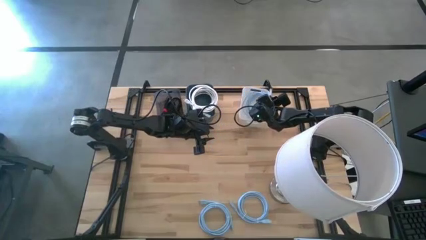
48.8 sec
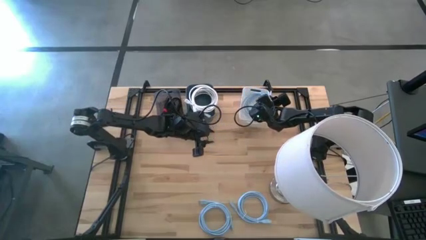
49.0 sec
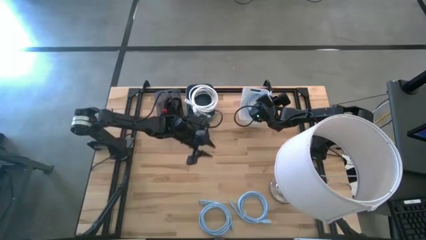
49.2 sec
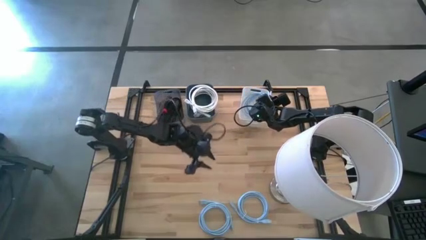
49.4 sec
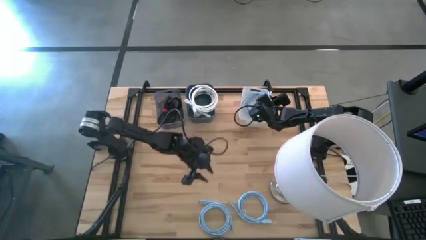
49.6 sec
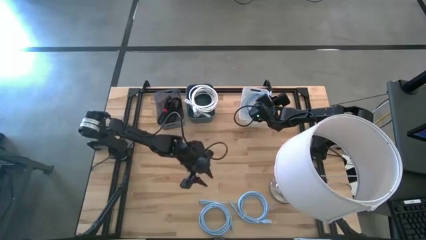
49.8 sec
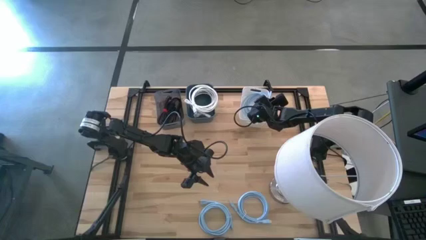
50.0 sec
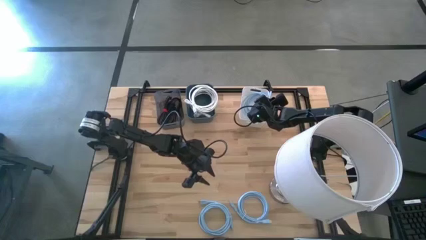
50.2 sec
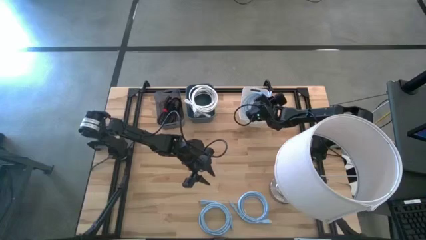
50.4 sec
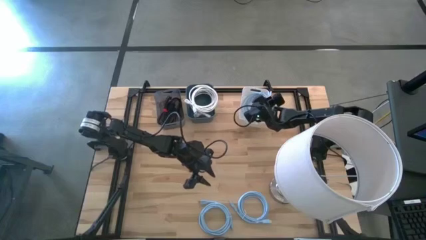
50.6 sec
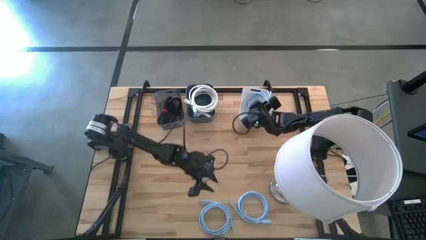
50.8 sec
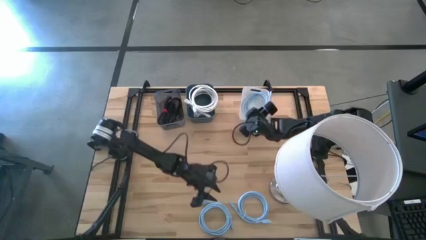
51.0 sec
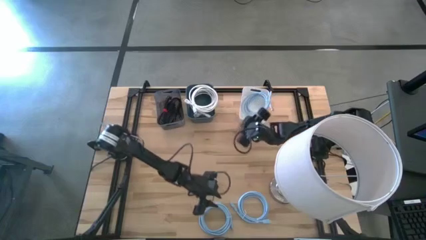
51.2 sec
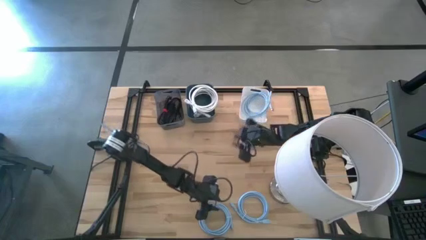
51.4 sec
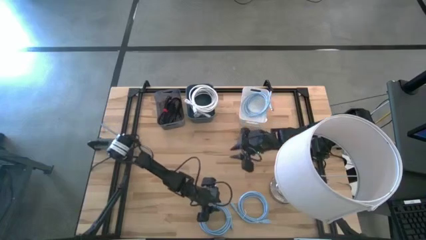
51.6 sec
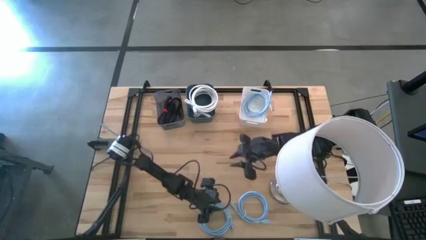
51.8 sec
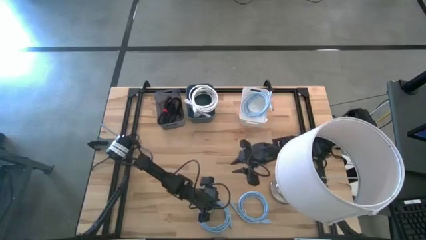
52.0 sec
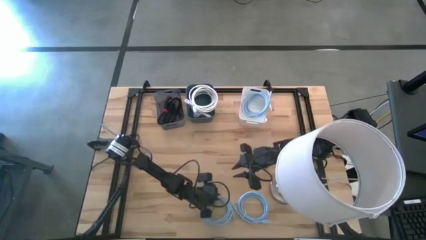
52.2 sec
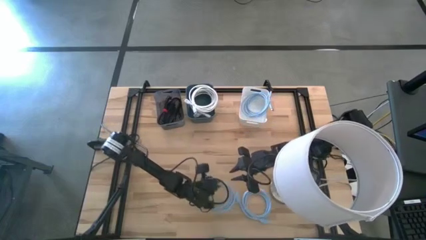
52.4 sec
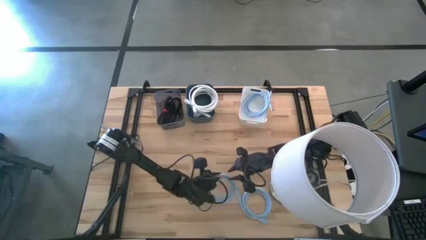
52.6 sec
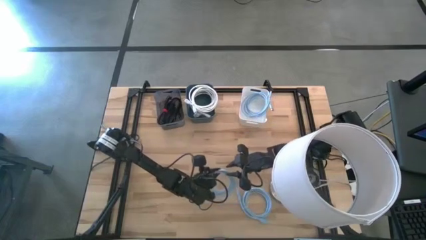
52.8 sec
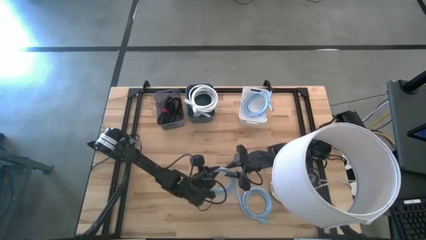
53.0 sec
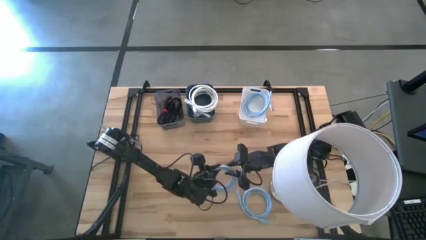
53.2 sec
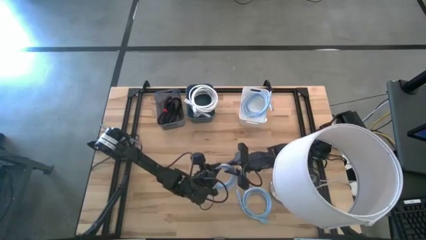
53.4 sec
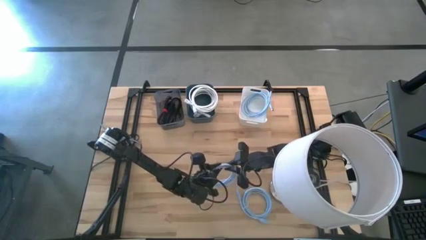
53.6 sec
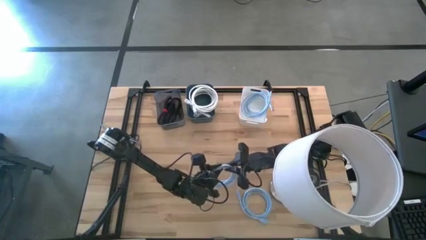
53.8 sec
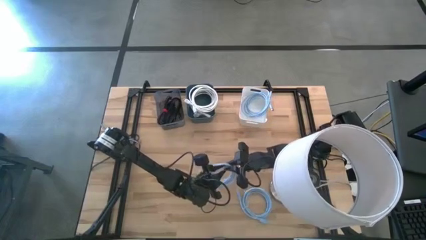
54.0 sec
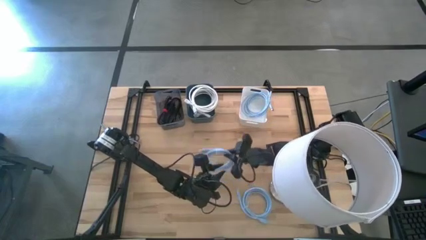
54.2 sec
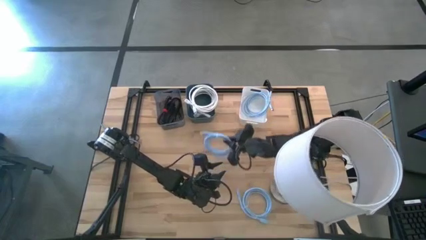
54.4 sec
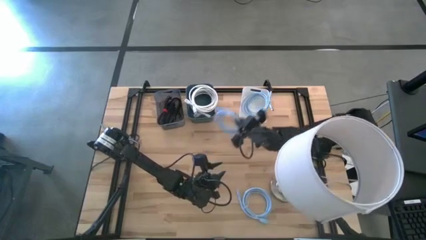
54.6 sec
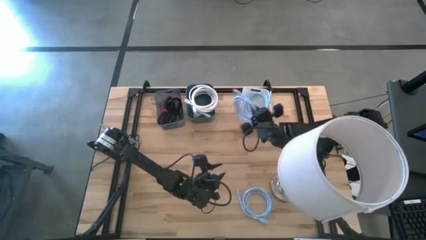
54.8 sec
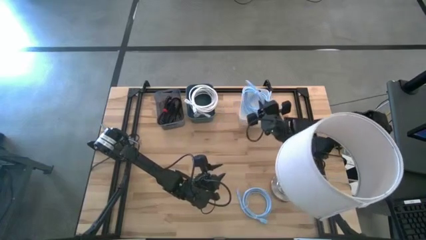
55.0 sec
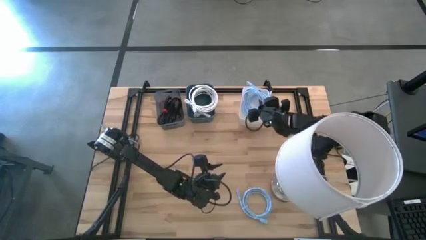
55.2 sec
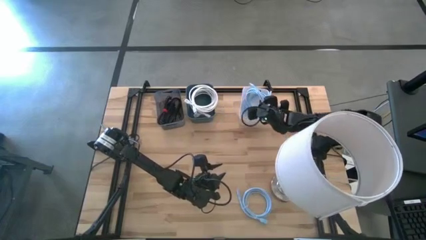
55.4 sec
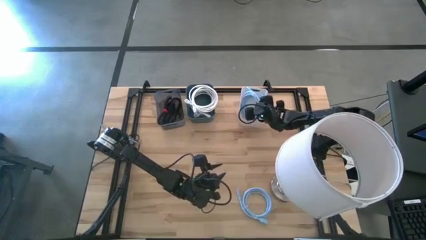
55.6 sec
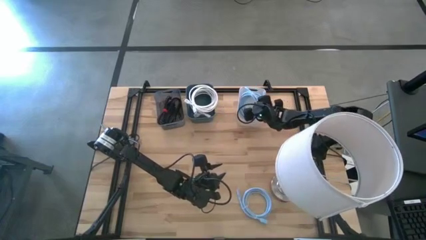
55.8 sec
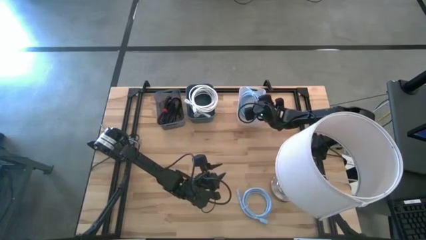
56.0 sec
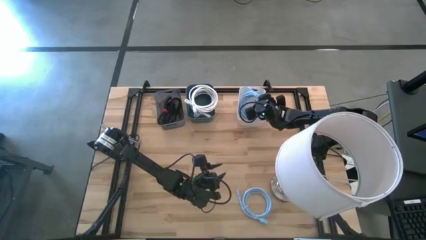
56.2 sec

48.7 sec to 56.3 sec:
Task: Sort HDMI cables
Put the left light blue HDMI cable into the white bin

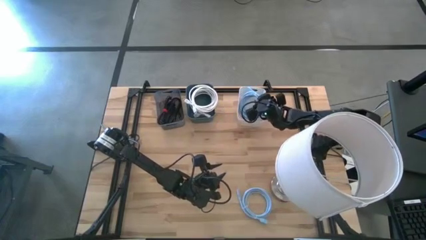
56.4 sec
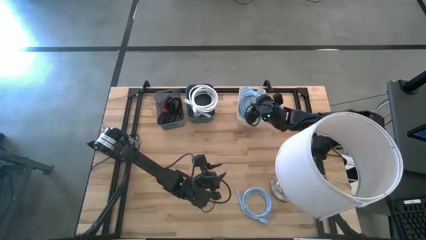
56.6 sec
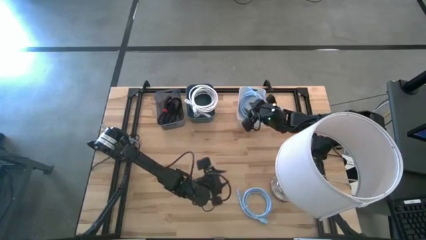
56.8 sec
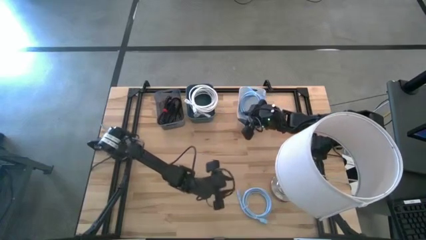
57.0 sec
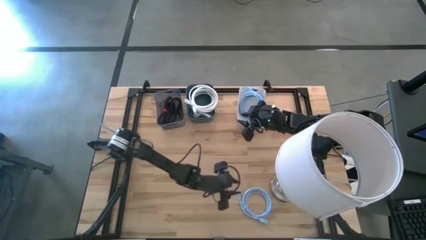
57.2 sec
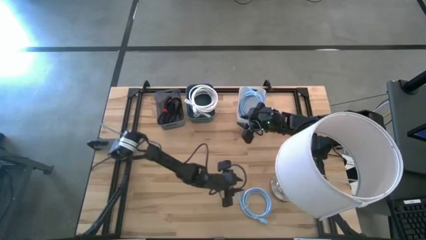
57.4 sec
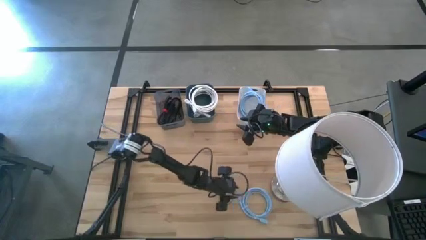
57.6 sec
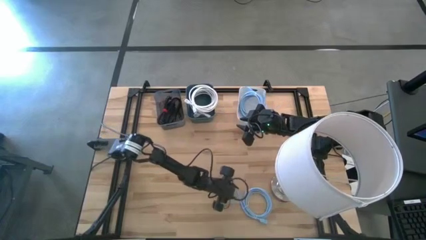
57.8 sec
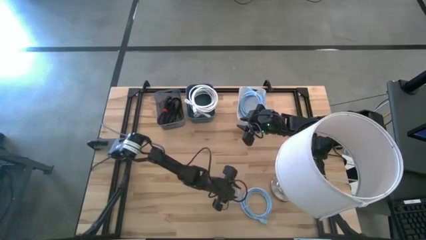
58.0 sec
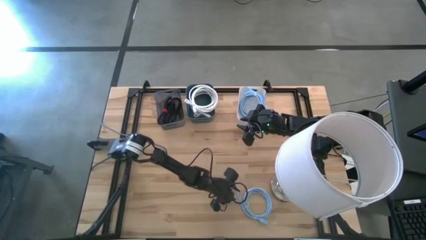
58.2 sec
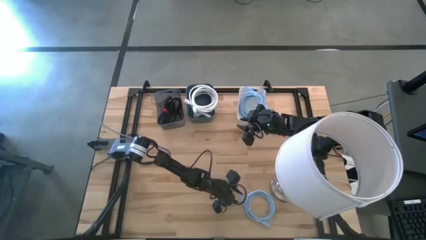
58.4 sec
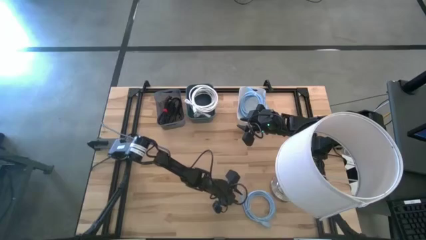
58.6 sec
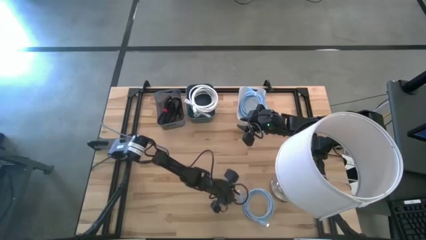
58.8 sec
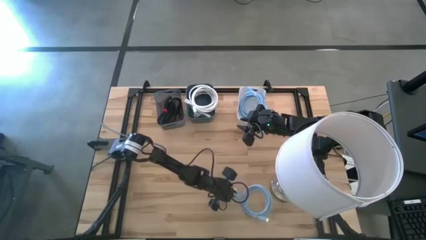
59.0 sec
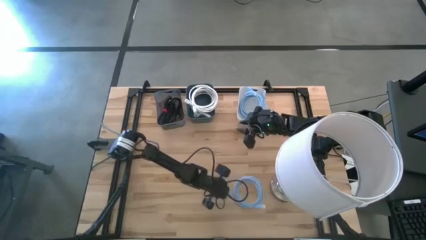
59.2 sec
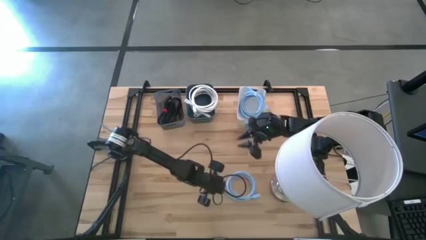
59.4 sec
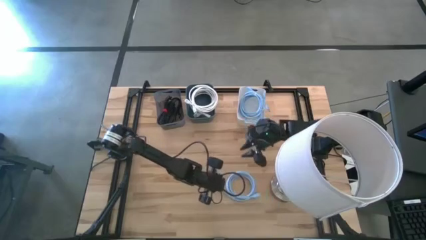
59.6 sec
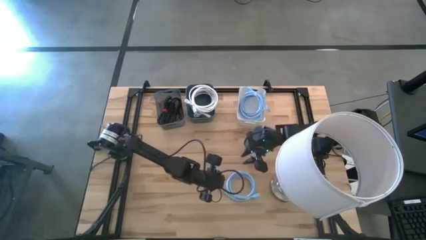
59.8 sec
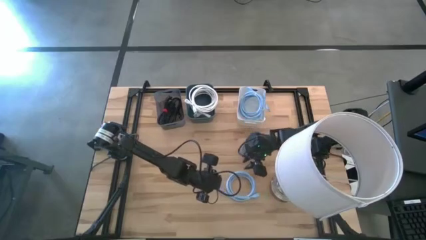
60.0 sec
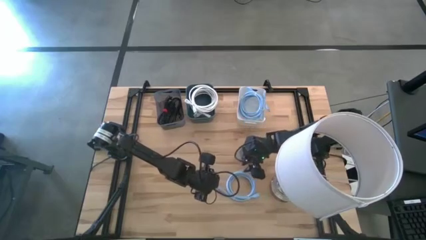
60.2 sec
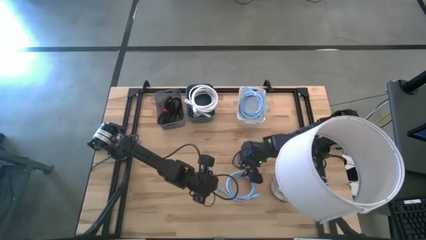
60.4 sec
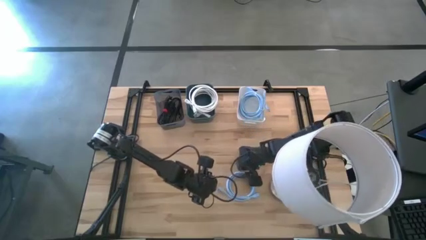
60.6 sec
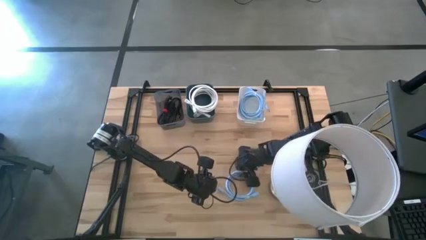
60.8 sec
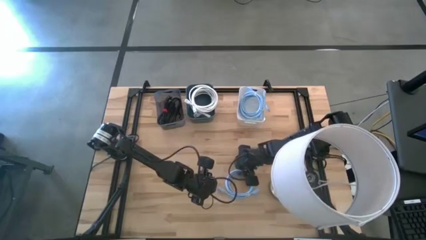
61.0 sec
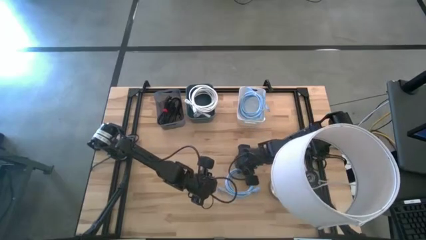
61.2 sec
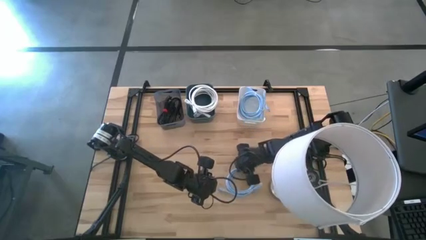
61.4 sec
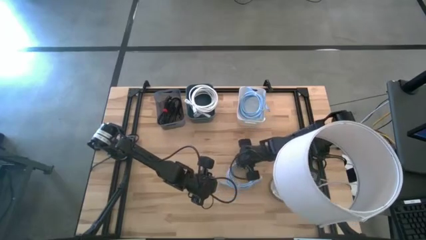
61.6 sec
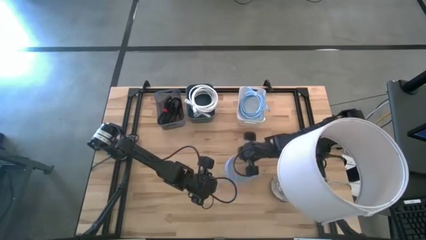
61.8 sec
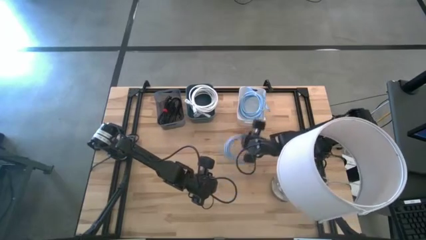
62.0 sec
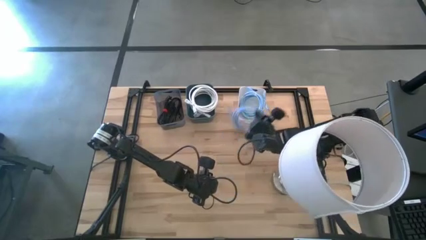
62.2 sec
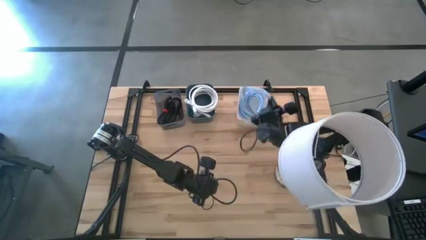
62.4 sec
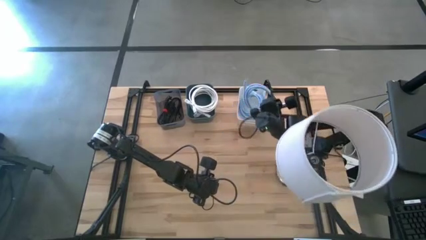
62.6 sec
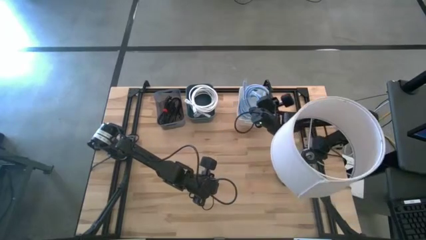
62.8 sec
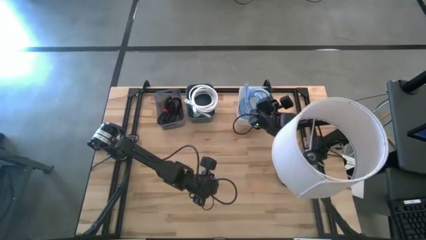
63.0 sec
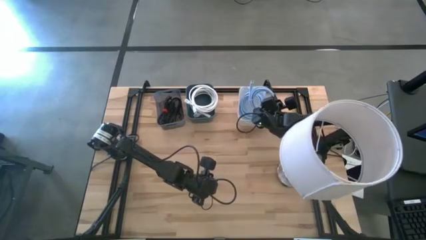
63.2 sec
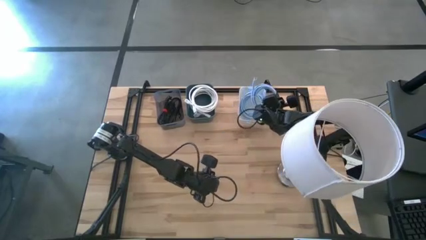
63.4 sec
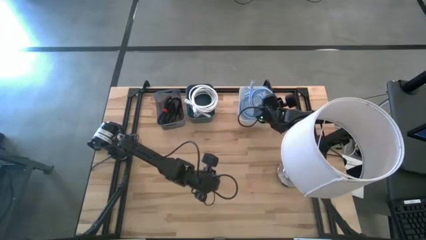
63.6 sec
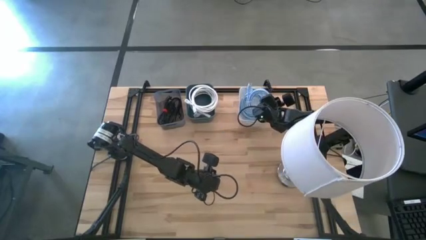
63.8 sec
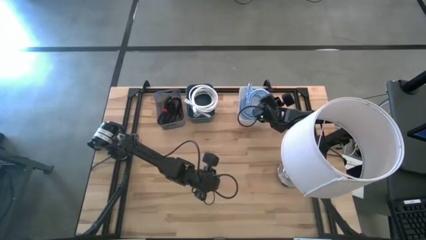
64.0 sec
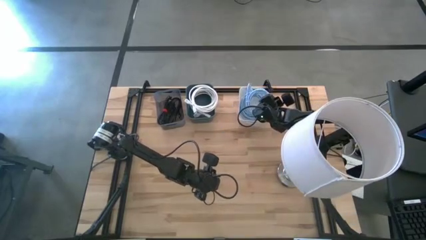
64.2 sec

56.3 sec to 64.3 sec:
Put the light blue HDMI cable into the white bin

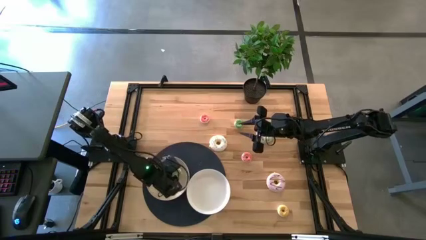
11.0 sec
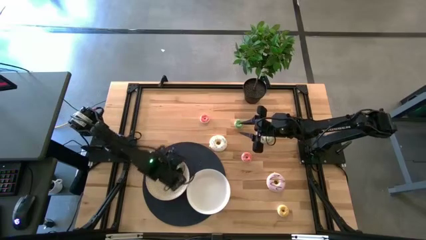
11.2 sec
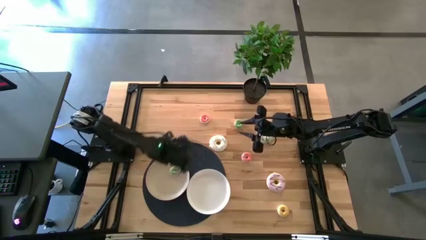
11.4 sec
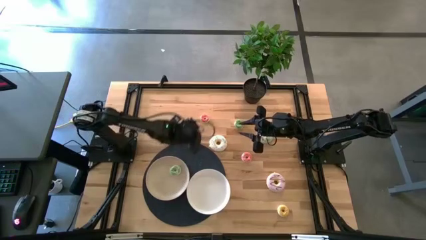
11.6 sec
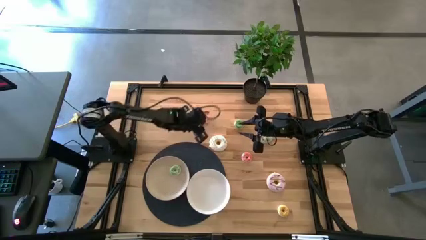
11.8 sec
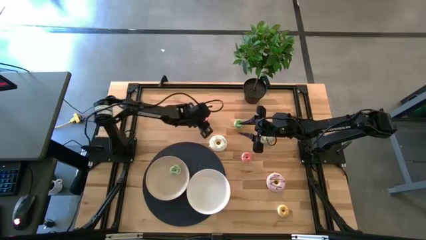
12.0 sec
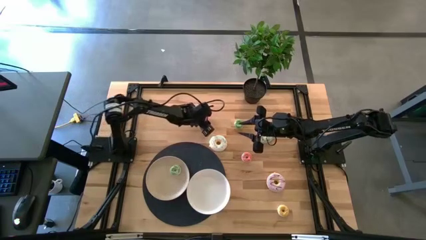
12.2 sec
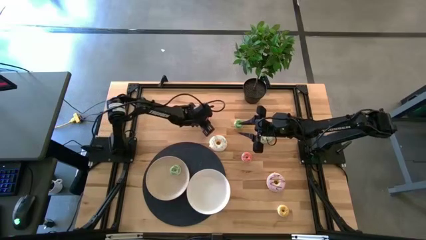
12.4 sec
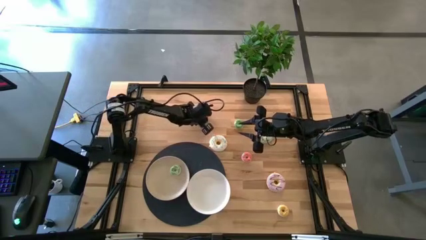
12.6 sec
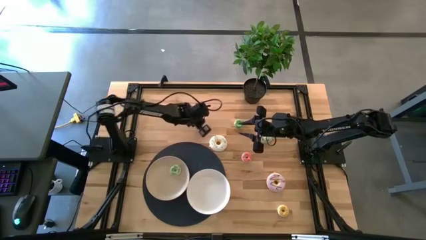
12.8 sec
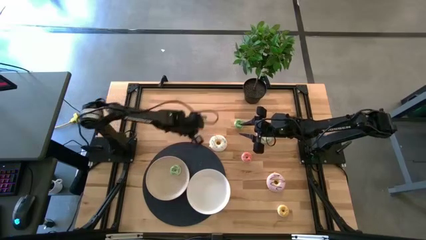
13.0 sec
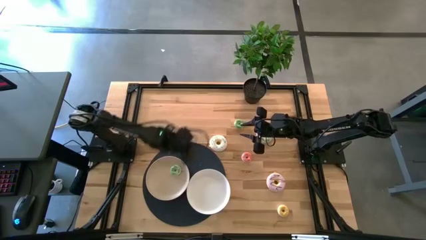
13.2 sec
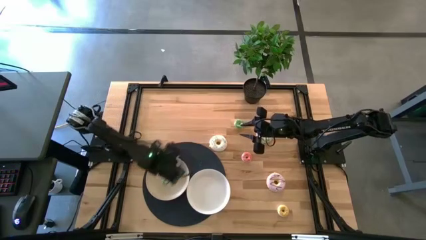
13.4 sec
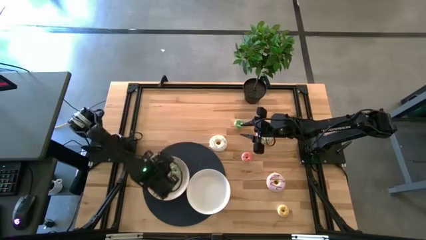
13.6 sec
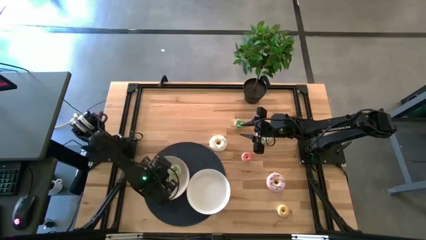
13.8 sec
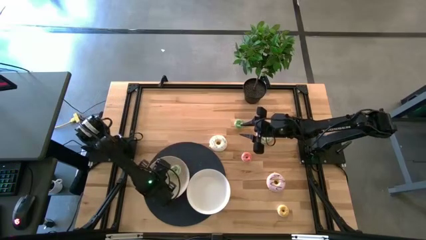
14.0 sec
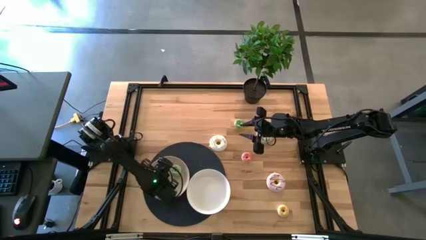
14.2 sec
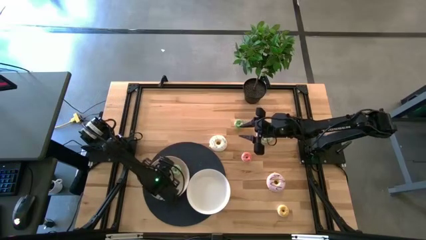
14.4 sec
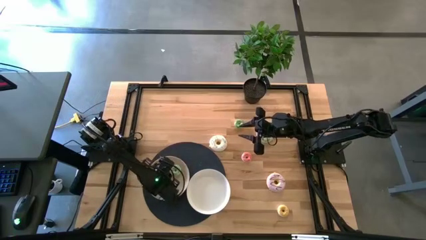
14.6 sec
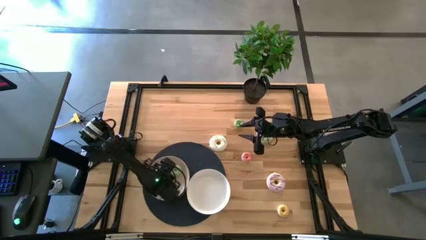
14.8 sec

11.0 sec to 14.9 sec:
Task: Pick & Place donuts
Put the top small pink donut on the left white plate
